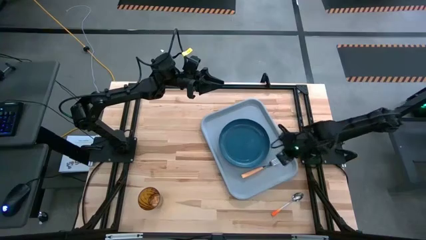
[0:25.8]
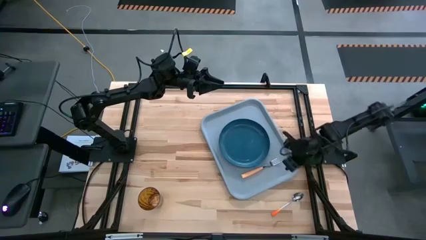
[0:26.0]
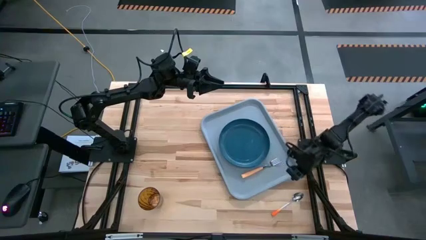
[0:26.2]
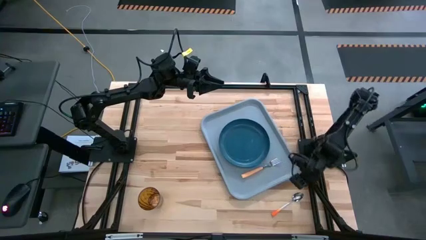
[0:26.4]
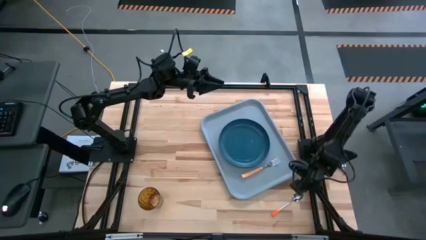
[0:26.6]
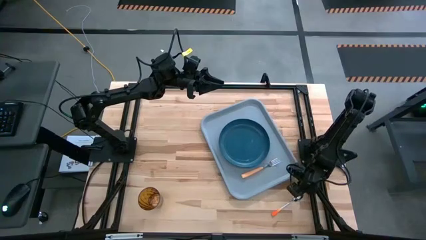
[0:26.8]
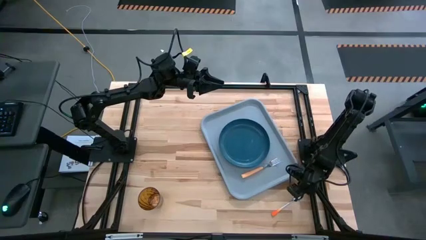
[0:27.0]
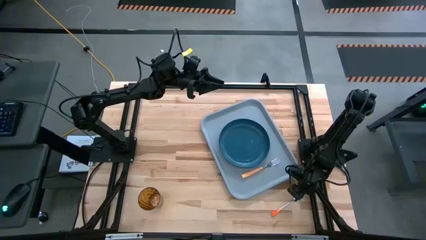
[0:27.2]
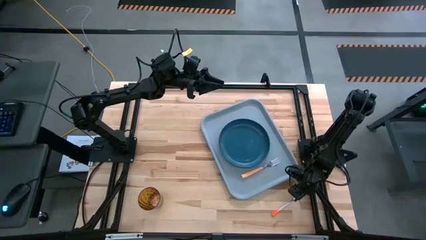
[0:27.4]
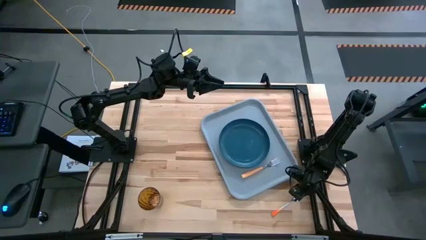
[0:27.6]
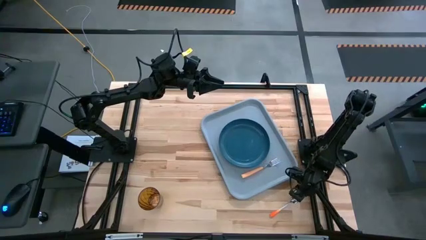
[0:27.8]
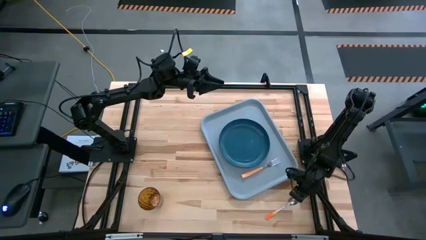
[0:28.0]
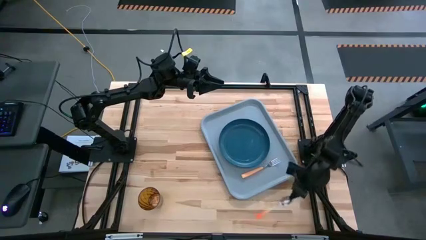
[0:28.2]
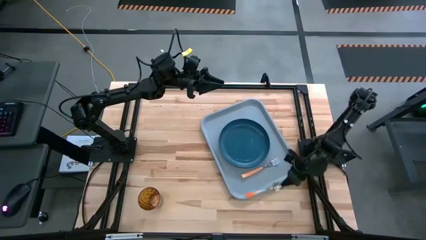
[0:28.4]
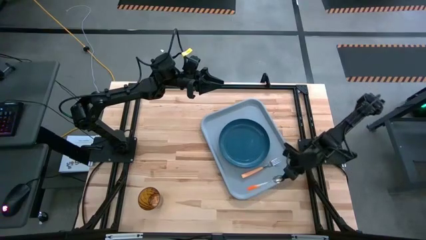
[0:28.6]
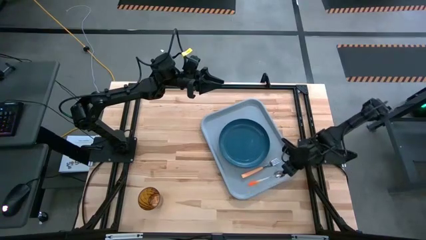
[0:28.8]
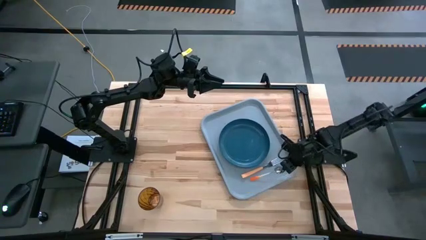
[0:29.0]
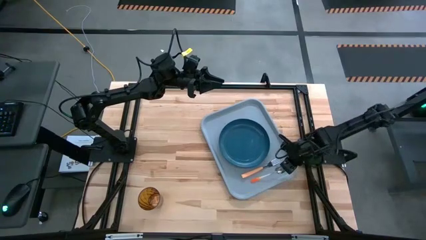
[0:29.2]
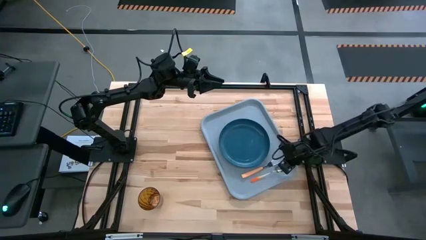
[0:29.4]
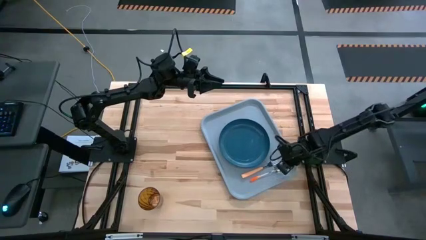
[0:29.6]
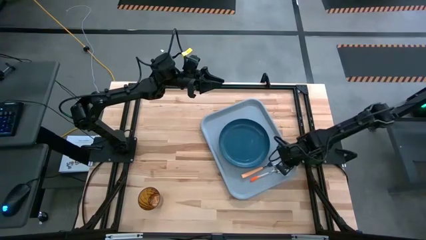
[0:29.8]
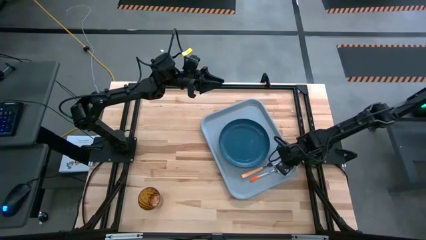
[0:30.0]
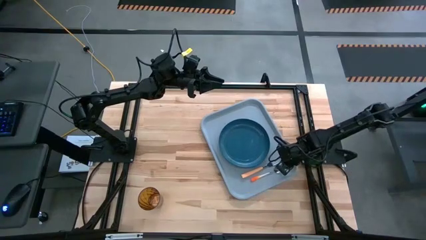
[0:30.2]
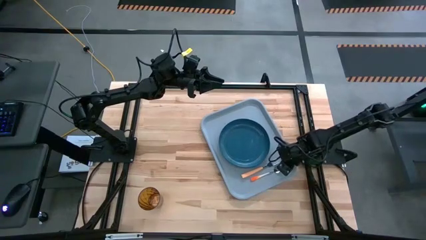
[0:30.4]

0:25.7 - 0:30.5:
Task: Pick and place plate/cup/fork/spoon on tray
Put the white orange spoon on the right side of the orange fork

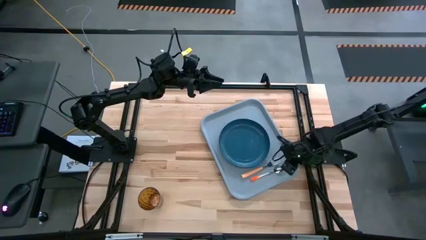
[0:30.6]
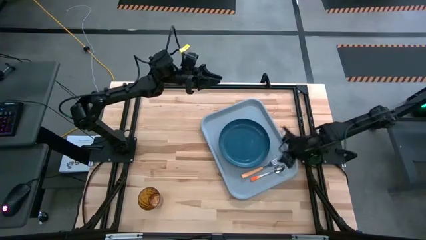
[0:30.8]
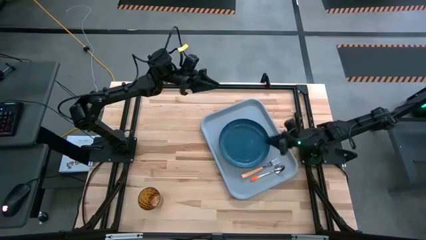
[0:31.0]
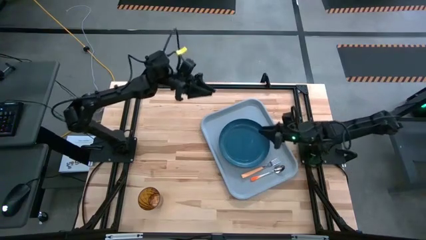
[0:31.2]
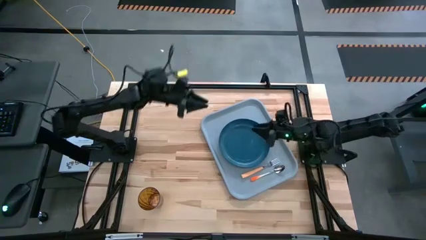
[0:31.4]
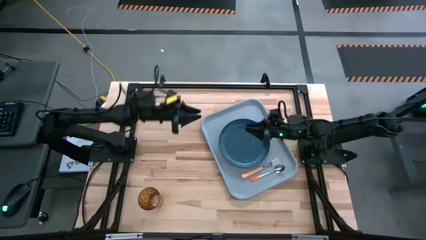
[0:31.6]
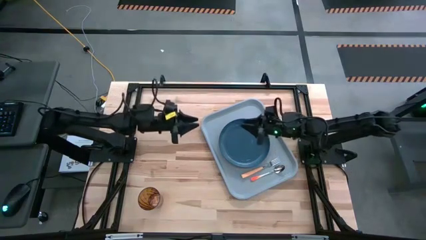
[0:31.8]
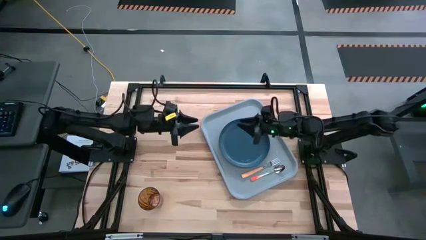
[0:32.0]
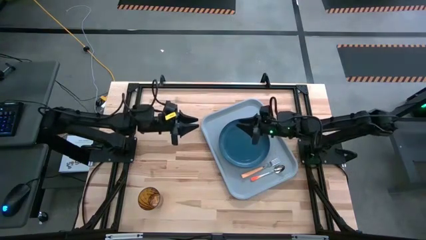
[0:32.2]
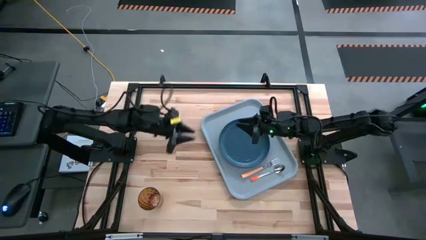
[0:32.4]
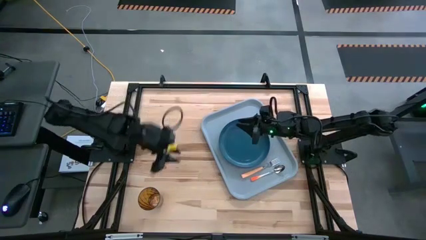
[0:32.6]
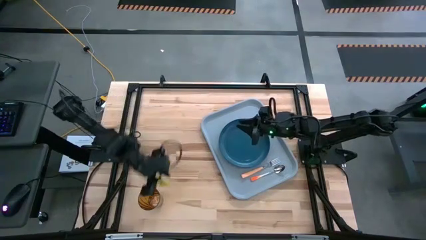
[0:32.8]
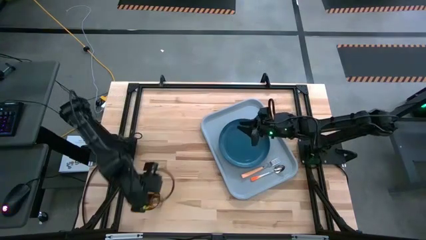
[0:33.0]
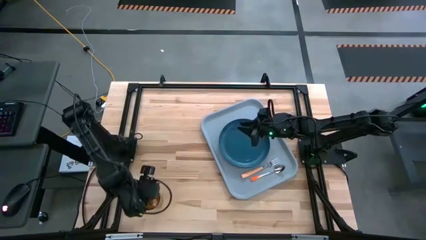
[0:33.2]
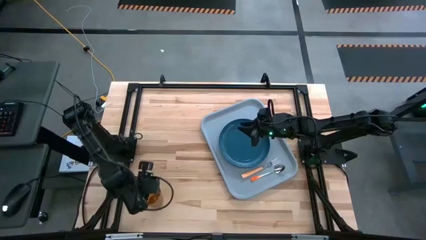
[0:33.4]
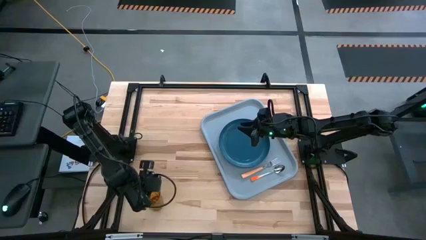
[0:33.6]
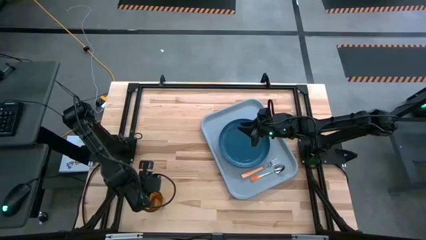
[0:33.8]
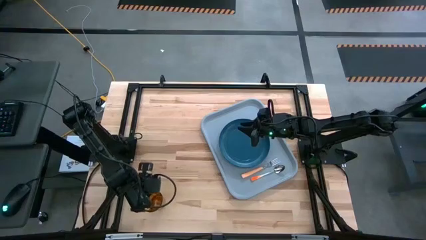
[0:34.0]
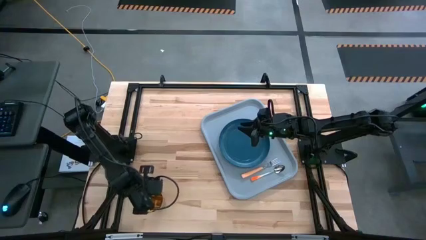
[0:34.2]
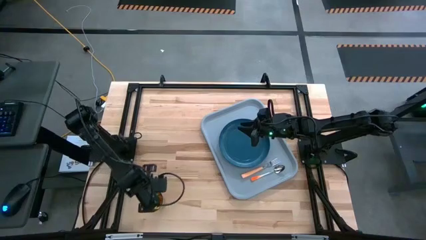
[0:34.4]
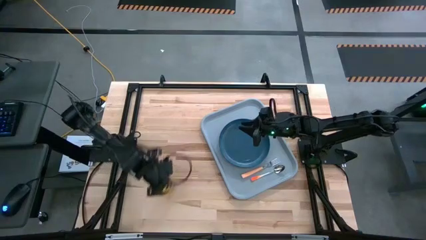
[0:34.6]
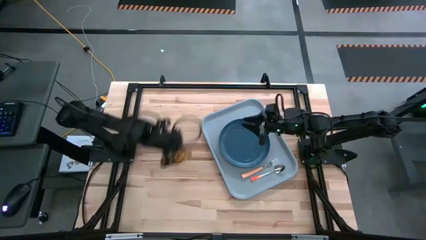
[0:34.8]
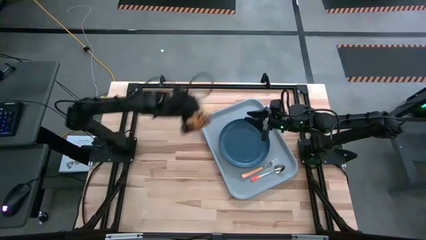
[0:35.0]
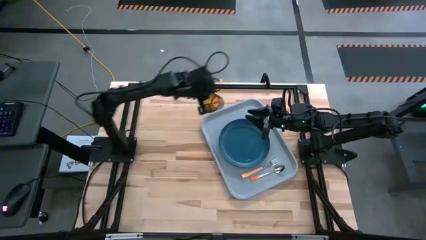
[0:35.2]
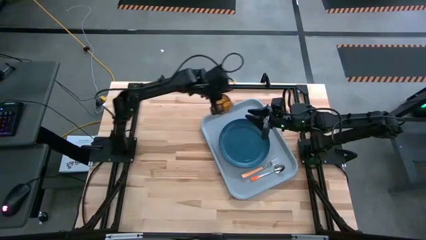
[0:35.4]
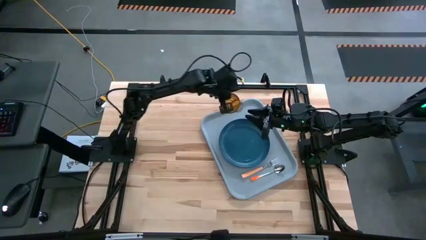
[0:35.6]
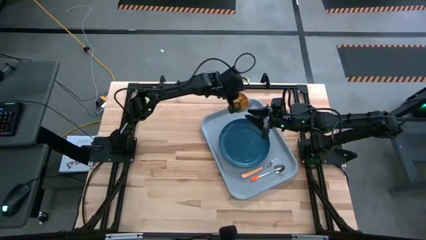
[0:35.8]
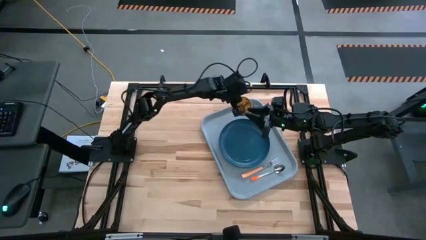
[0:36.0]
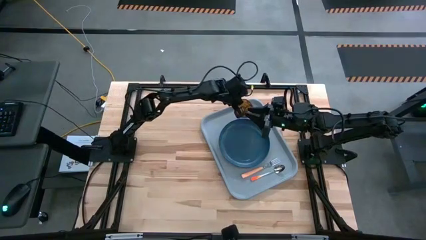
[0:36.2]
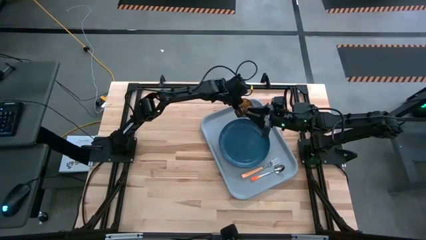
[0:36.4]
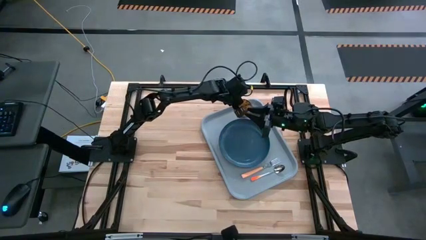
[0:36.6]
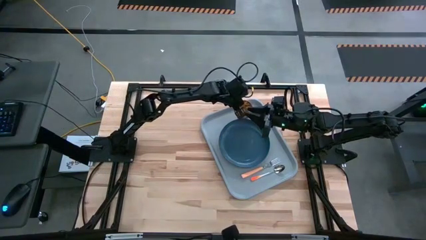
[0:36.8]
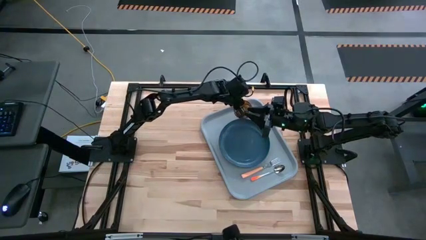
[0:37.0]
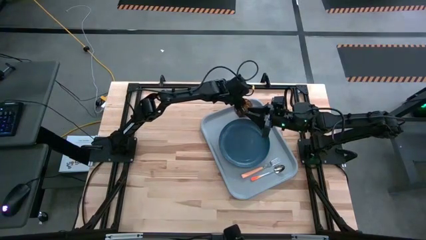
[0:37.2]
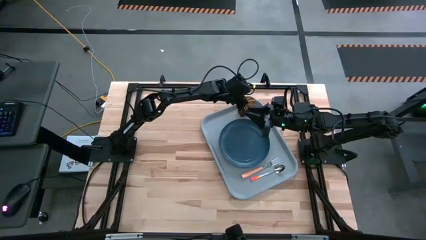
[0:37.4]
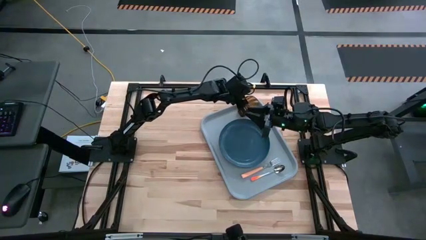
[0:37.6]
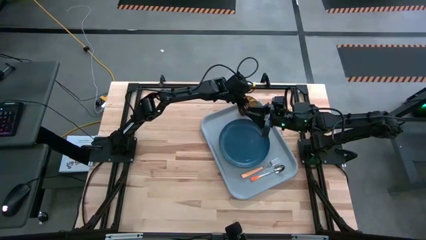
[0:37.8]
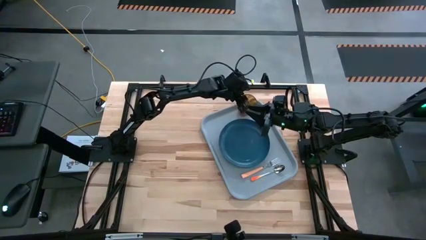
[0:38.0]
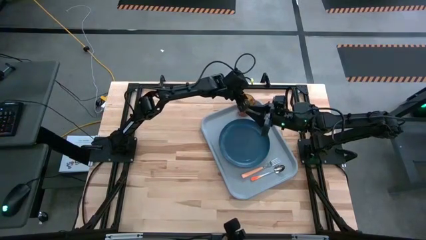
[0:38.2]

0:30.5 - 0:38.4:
Put the brown cup on the top left of the dark blue plate

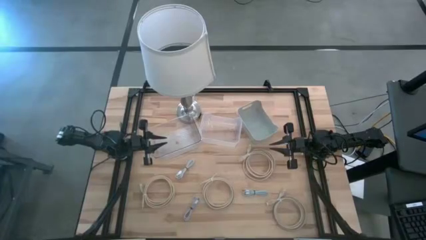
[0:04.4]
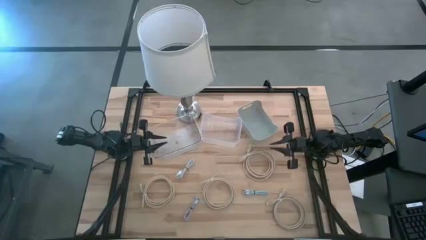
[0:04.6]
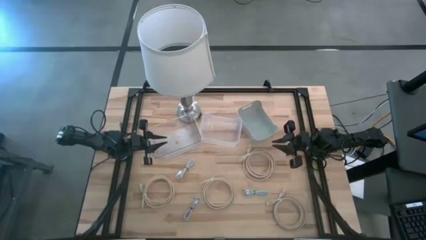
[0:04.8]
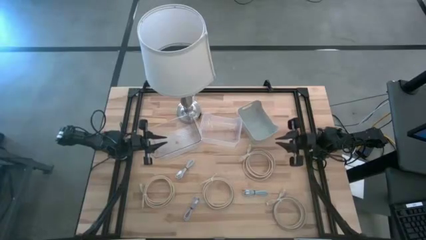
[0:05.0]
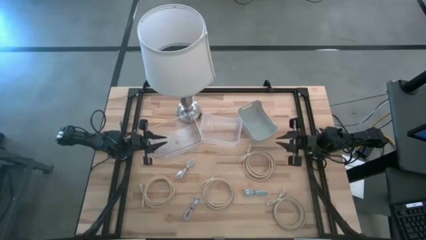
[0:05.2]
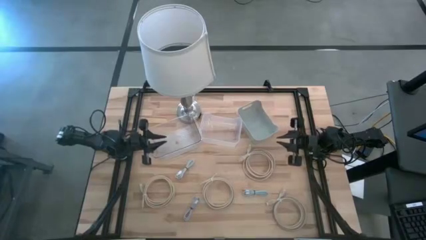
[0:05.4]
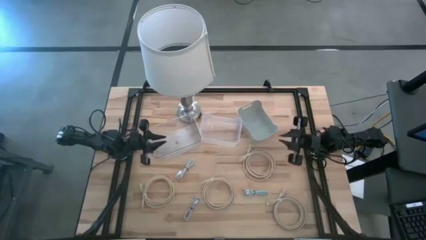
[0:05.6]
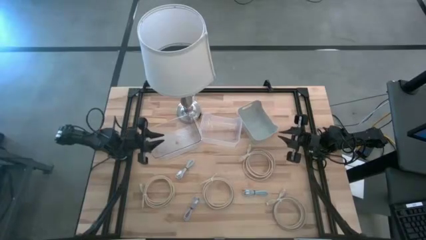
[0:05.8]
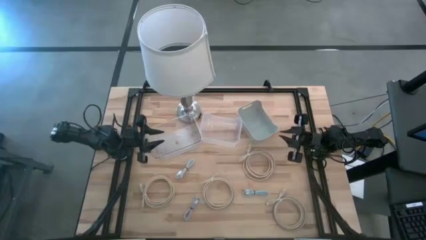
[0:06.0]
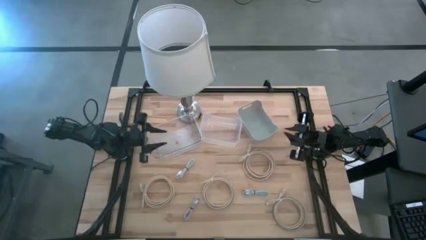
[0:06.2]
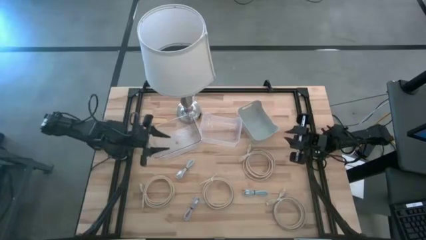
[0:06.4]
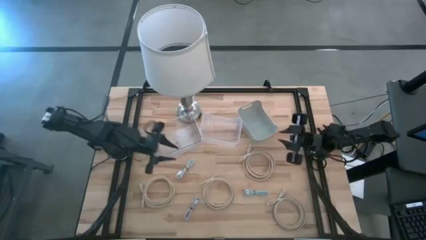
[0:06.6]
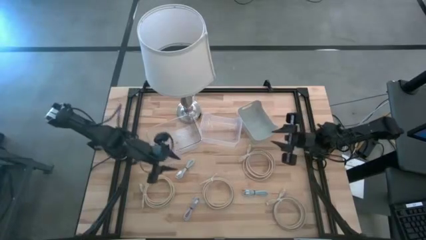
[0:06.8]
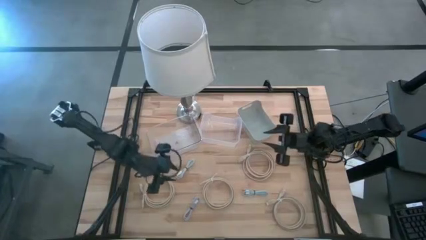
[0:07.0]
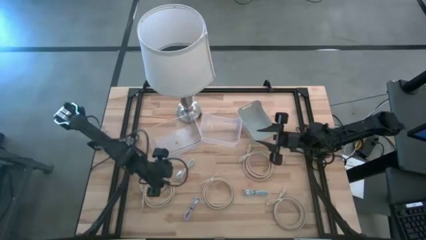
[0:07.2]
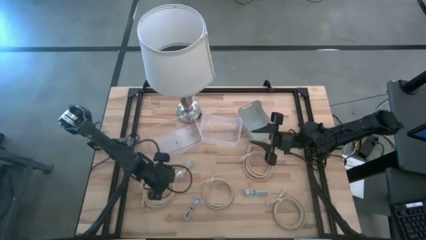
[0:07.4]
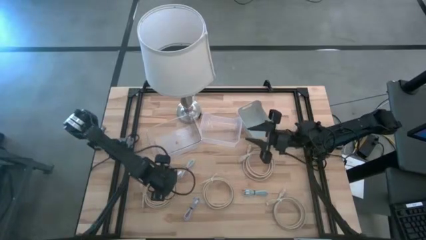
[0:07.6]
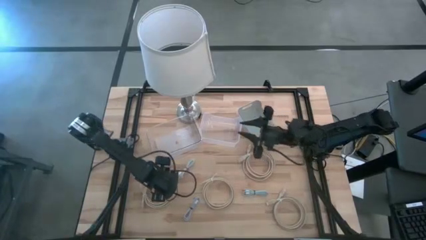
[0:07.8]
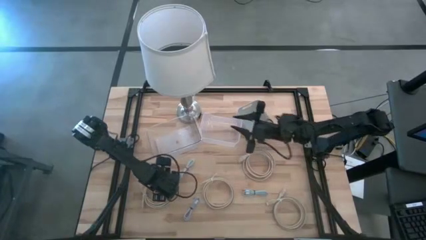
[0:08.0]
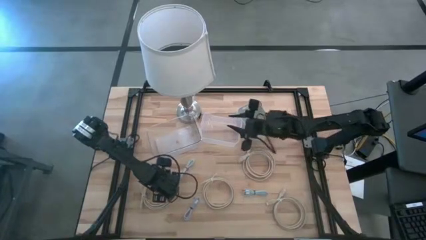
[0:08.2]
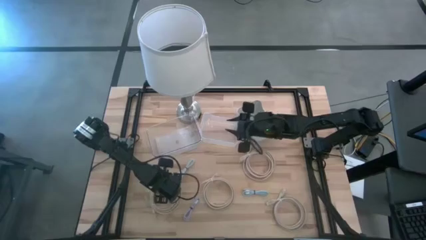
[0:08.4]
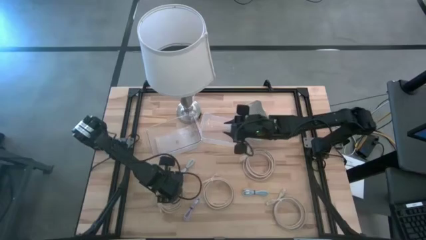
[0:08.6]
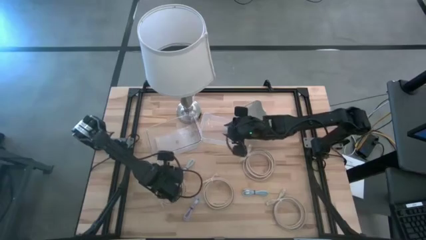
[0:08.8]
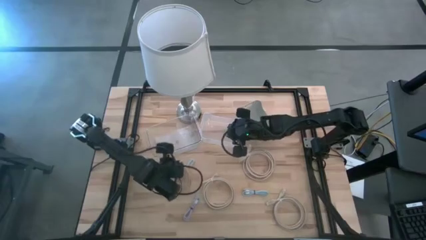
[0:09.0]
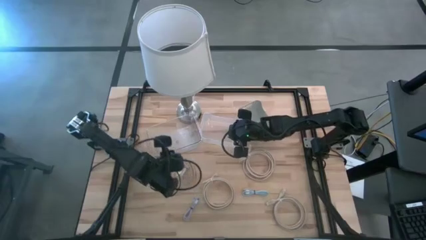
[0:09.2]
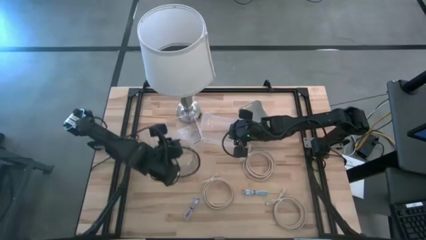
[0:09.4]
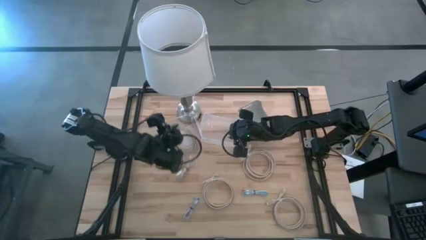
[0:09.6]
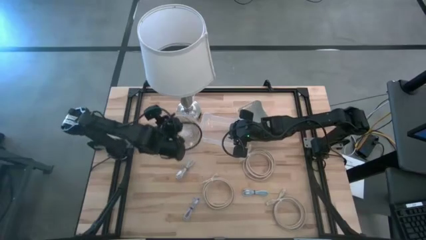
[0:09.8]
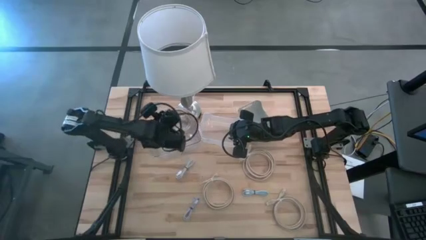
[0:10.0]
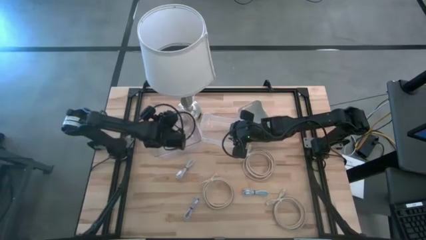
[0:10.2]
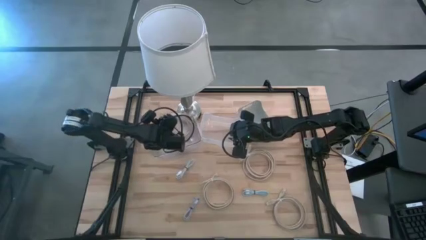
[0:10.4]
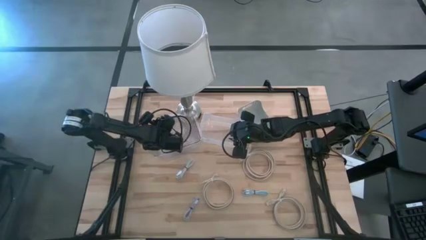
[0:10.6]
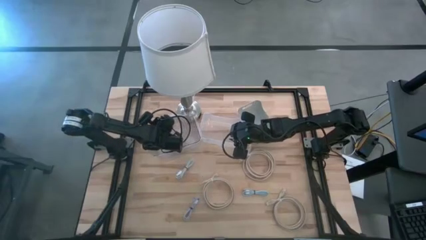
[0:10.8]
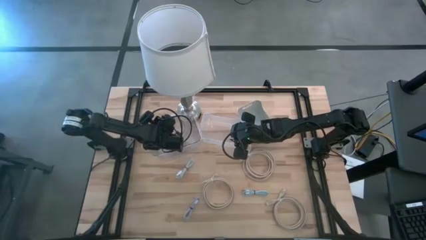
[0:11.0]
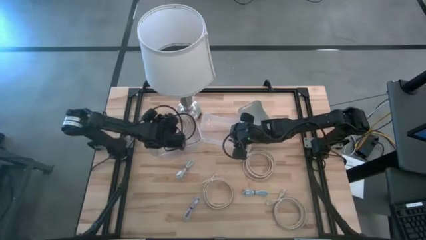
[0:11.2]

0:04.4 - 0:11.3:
Task: Pick & Place USB Port
Put the brown HDMI cable into the transparent bin
